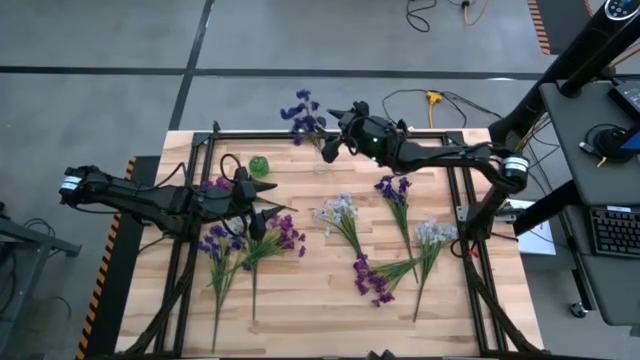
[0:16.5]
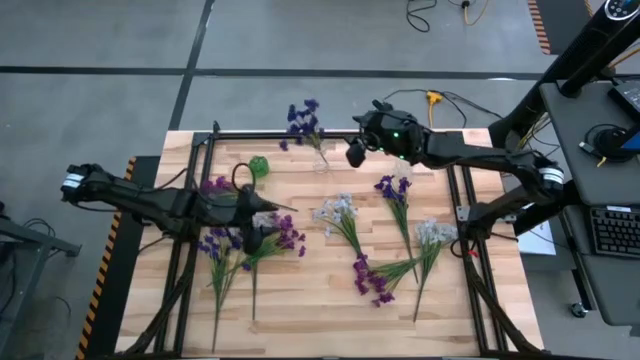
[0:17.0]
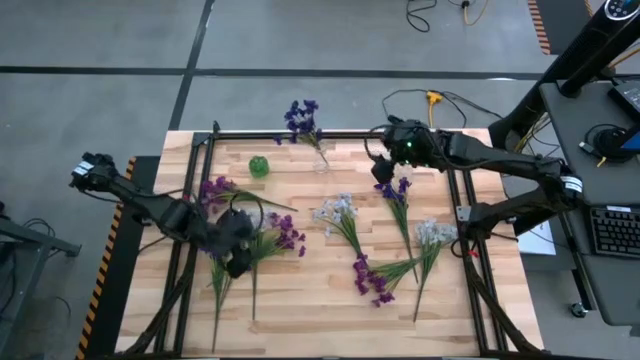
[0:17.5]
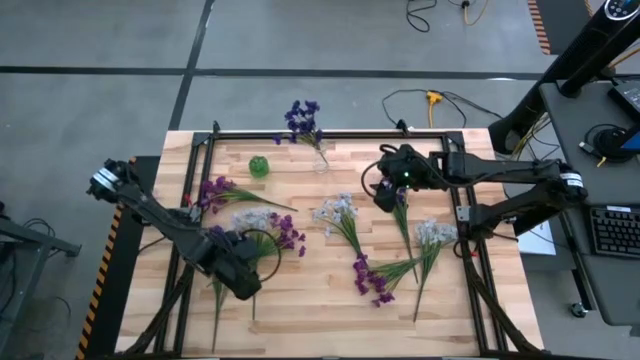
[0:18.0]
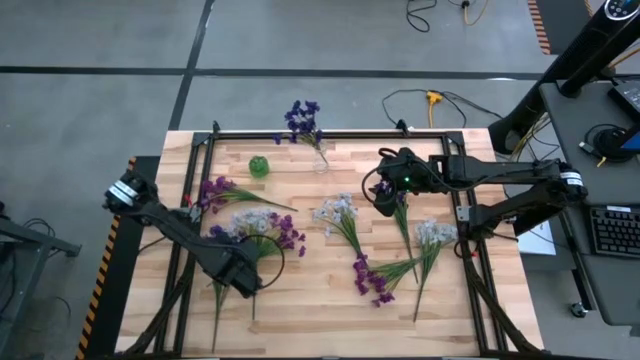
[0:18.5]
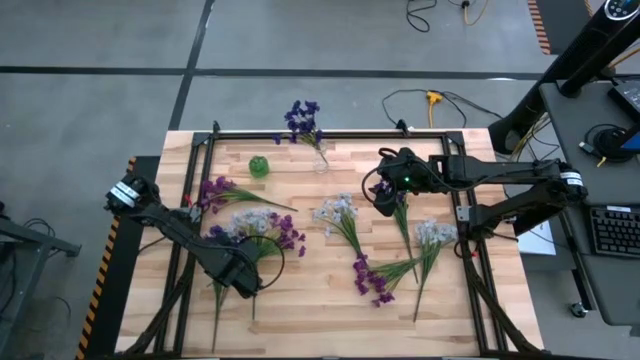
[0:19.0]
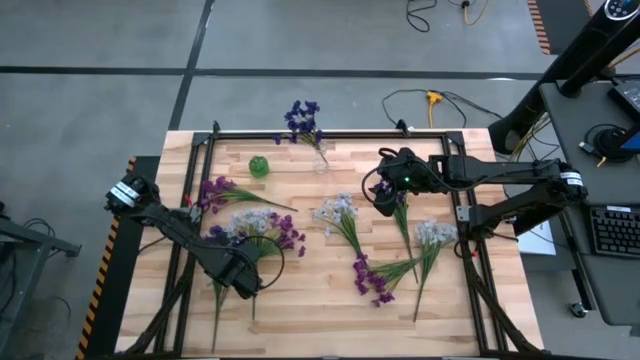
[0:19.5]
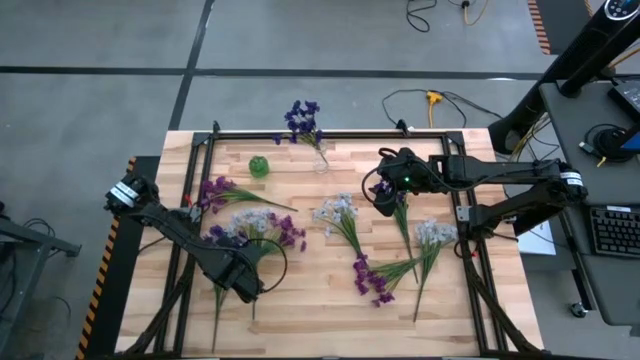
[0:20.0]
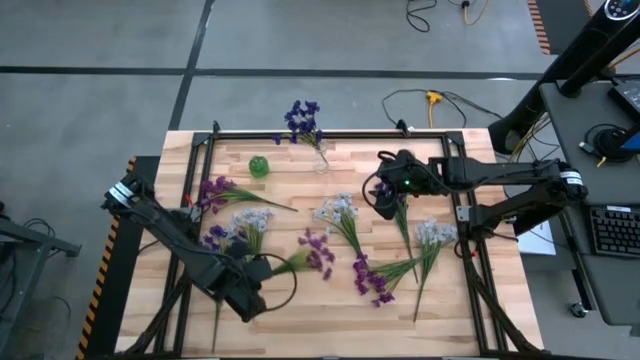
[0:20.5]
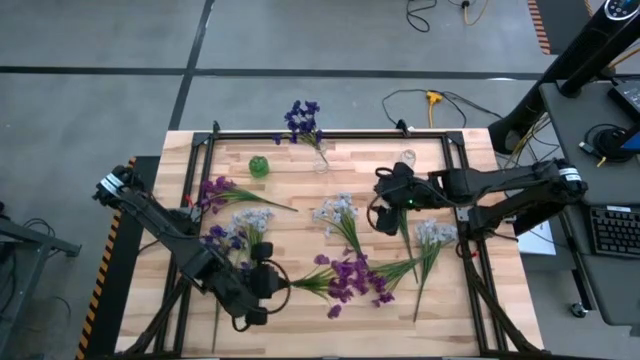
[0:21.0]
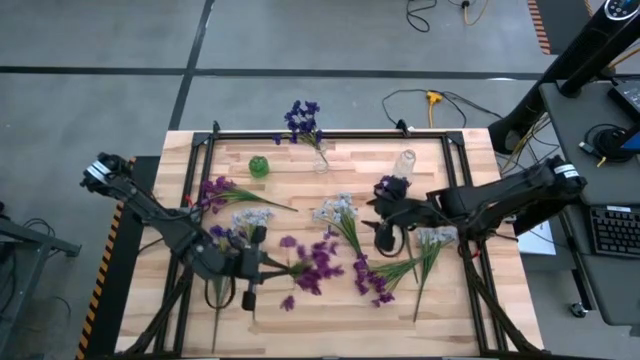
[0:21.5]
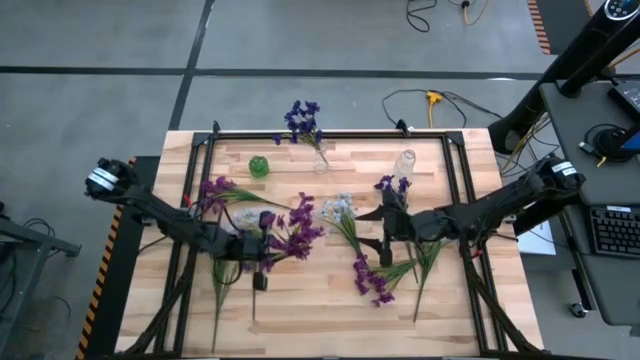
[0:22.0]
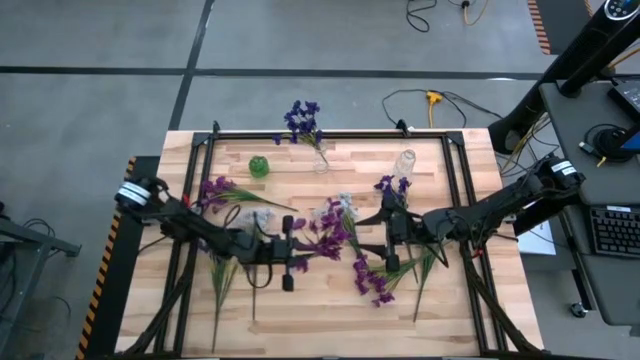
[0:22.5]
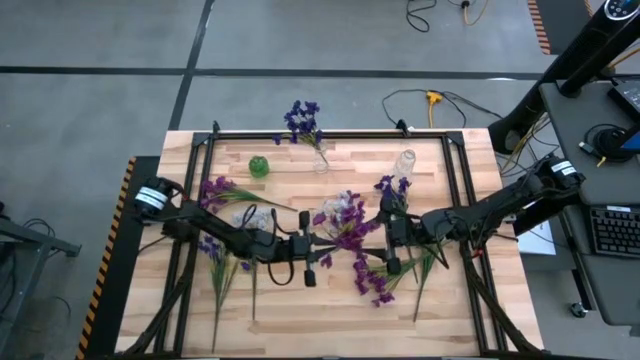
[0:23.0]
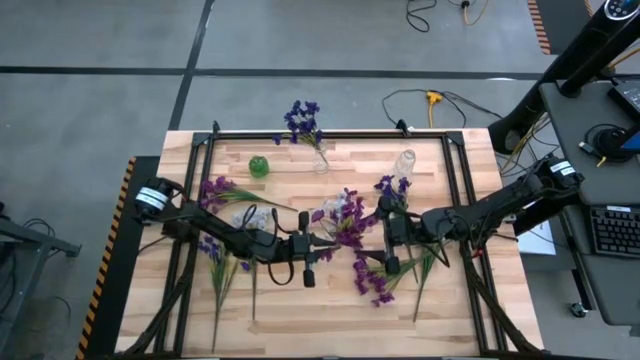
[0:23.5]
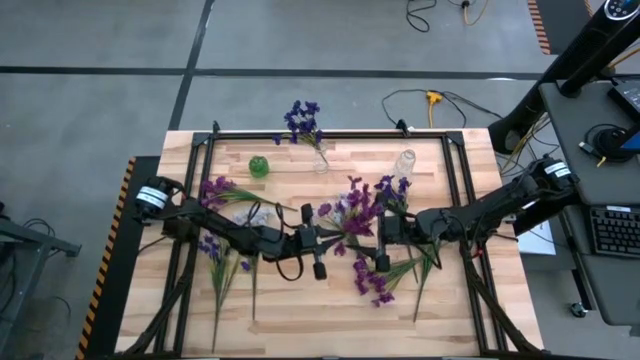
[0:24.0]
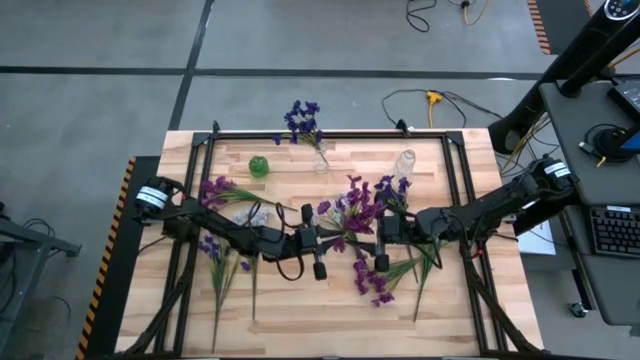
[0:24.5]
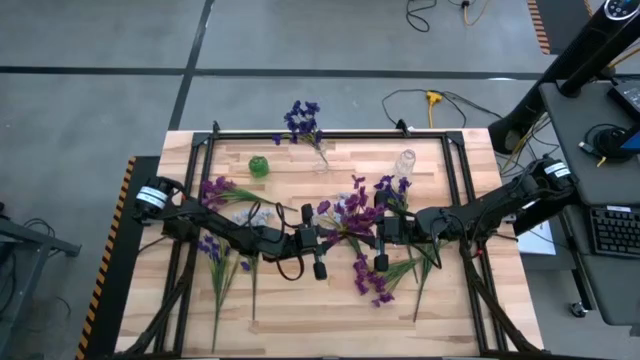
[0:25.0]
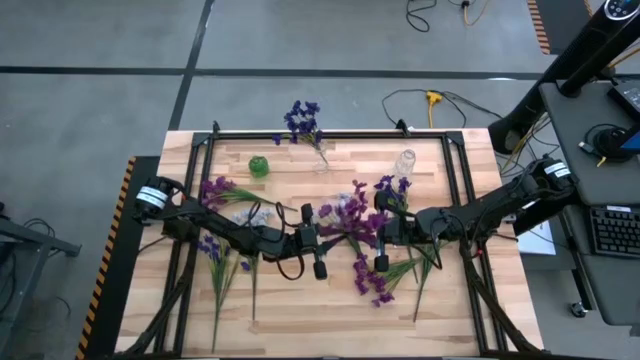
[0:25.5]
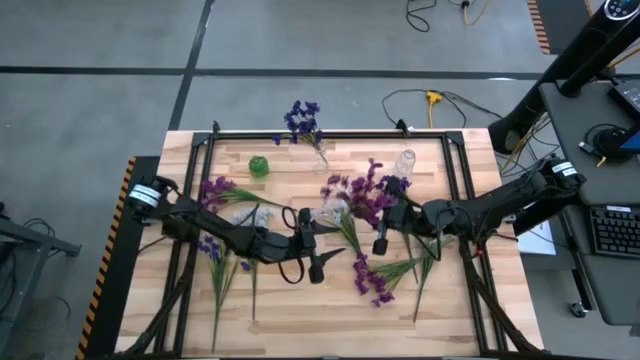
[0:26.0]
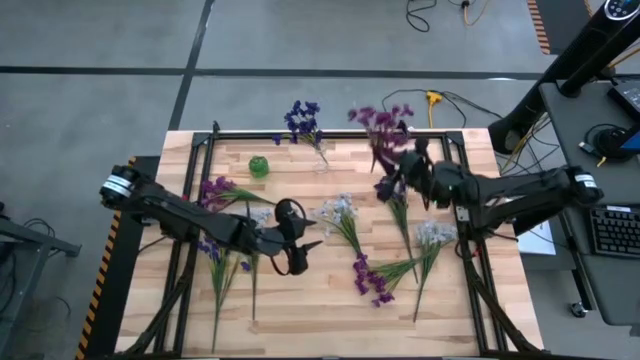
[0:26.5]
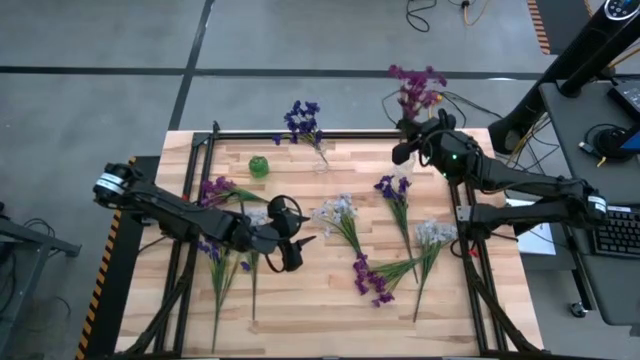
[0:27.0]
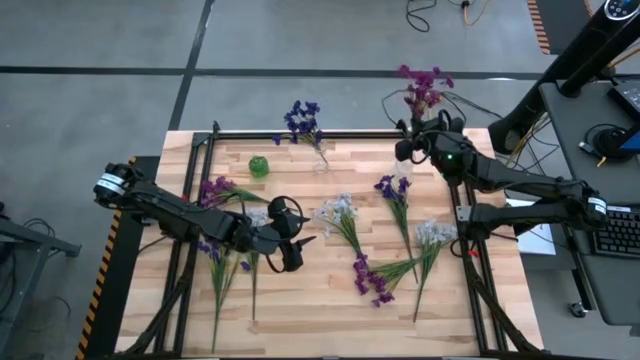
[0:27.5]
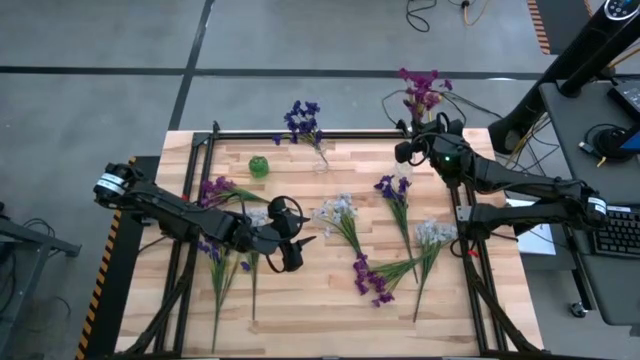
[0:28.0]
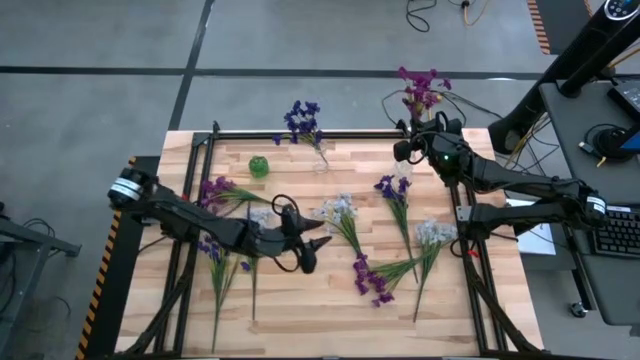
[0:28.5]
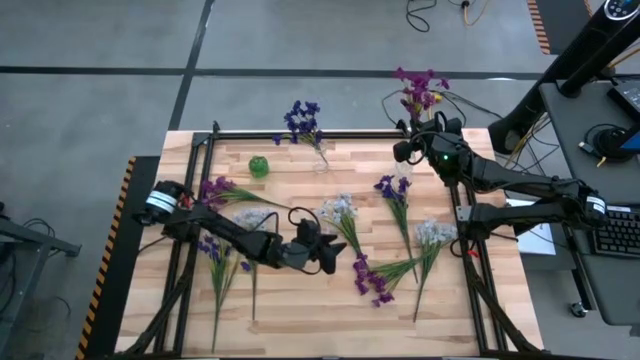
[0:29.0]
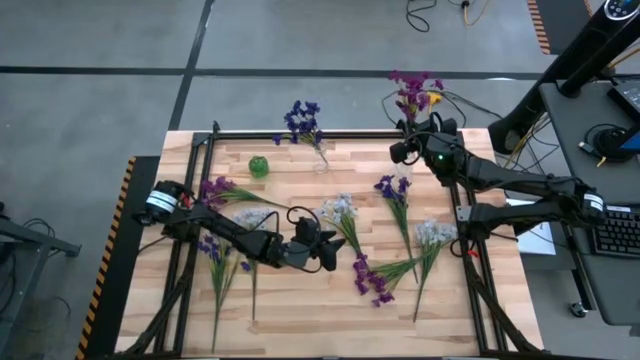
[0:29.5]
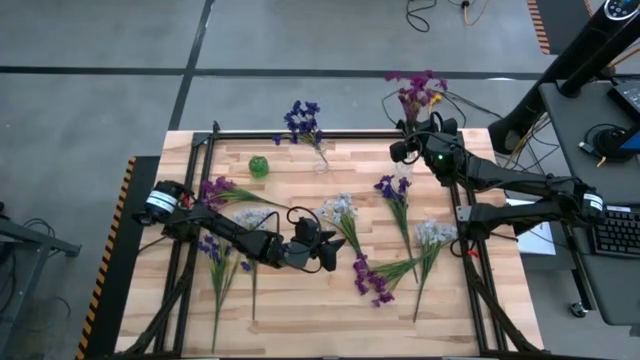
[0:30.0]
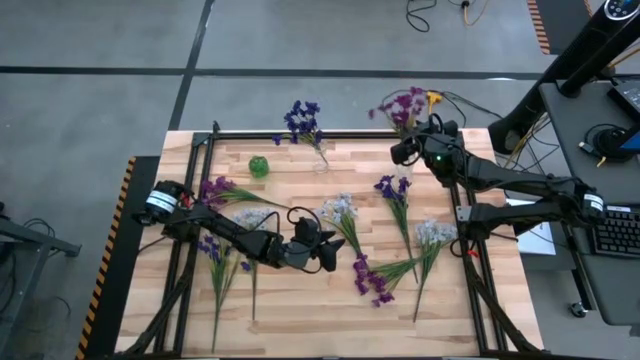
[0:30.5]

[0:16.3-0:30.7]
Task: Sort flowers into vase by color
Put the bottom left light violet flowers into the right transparent vase

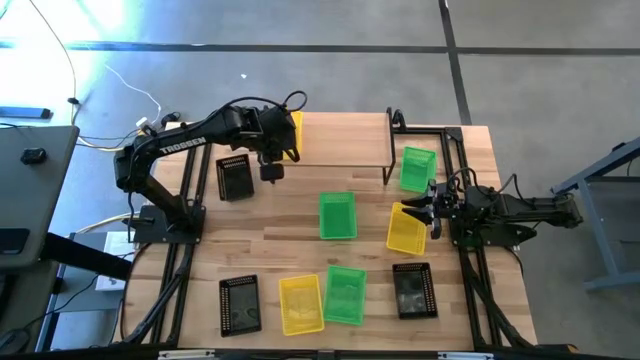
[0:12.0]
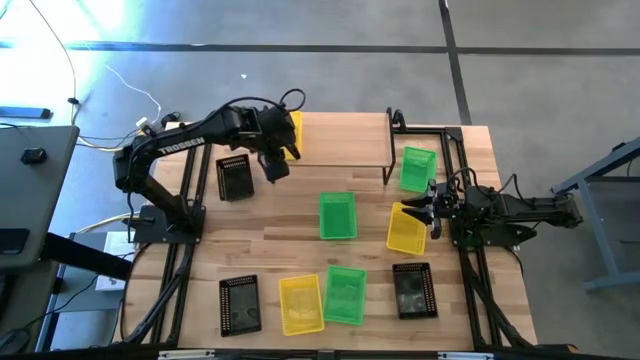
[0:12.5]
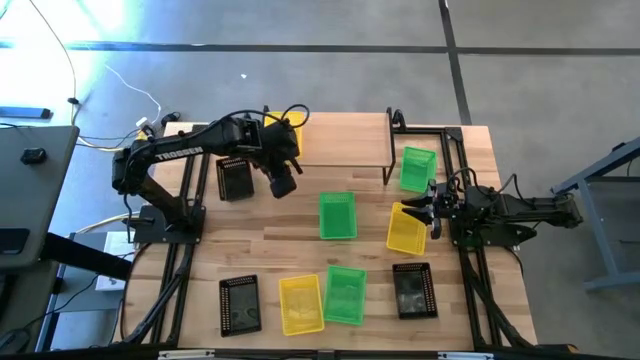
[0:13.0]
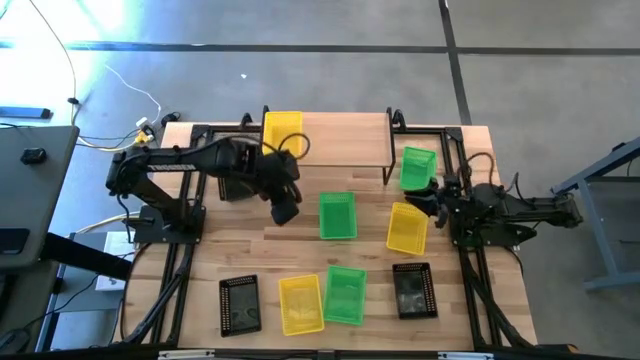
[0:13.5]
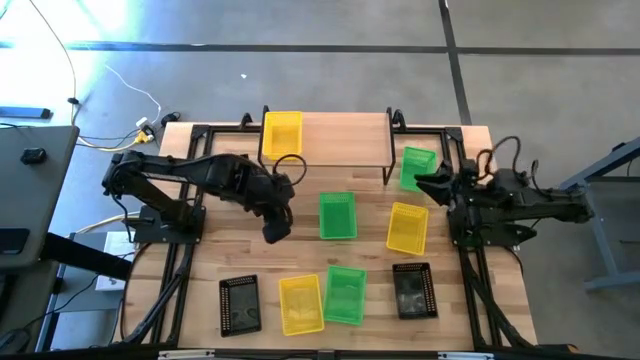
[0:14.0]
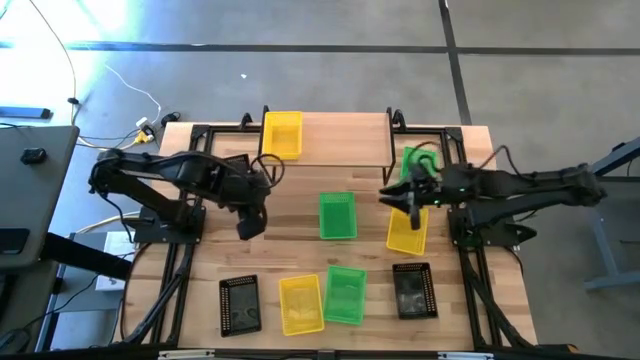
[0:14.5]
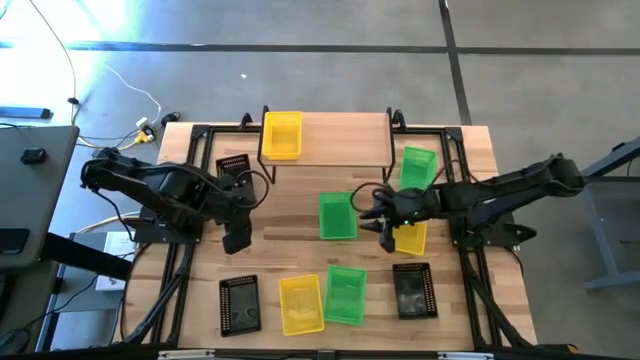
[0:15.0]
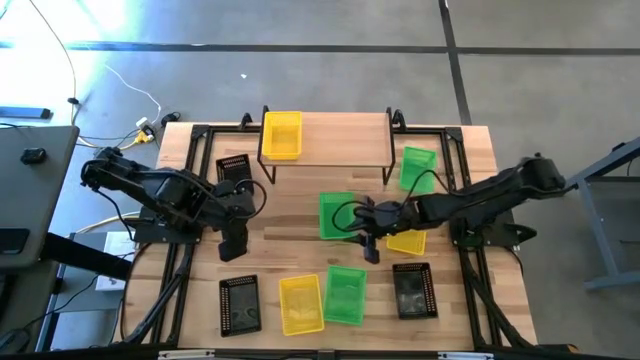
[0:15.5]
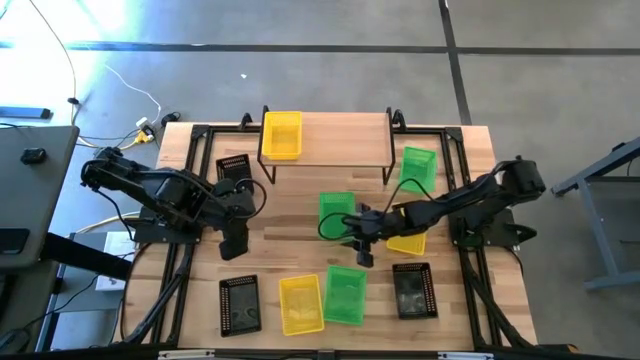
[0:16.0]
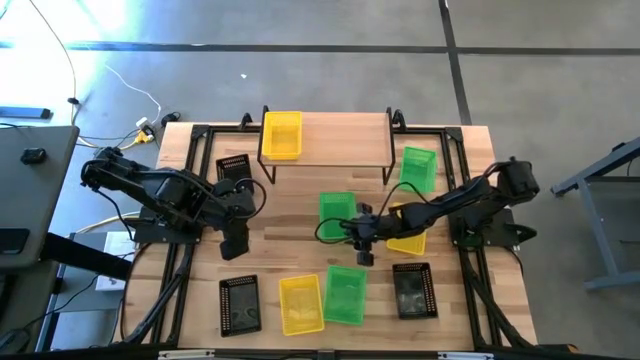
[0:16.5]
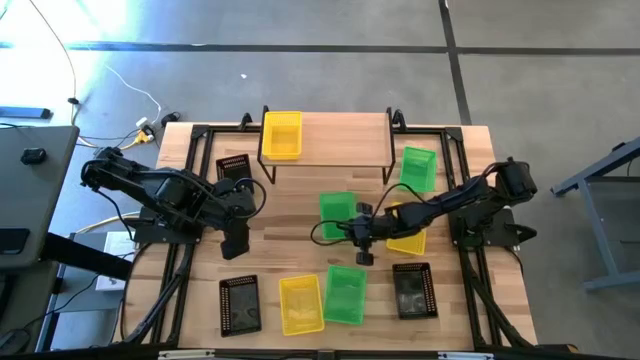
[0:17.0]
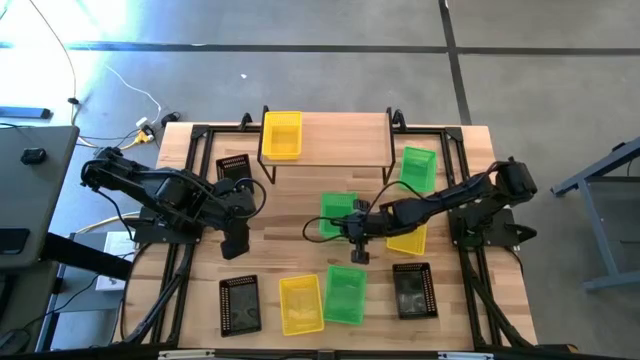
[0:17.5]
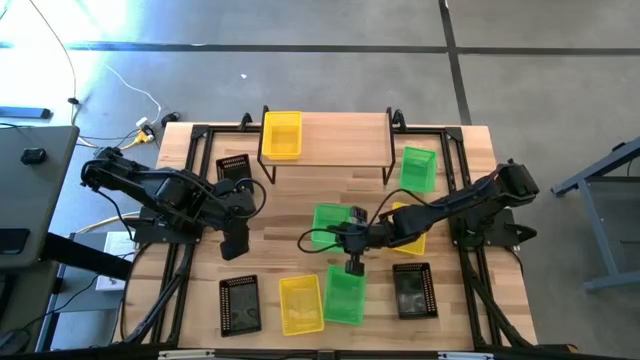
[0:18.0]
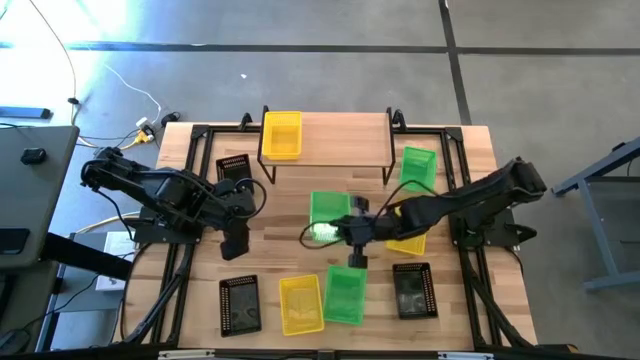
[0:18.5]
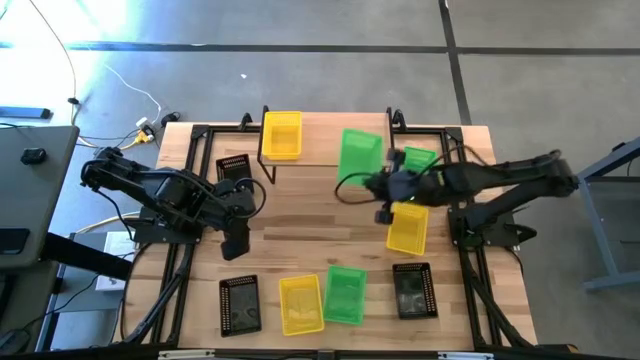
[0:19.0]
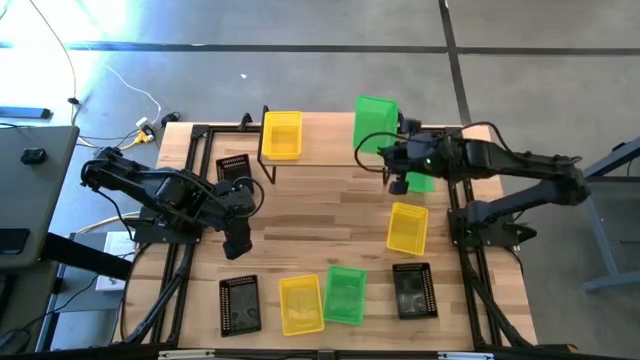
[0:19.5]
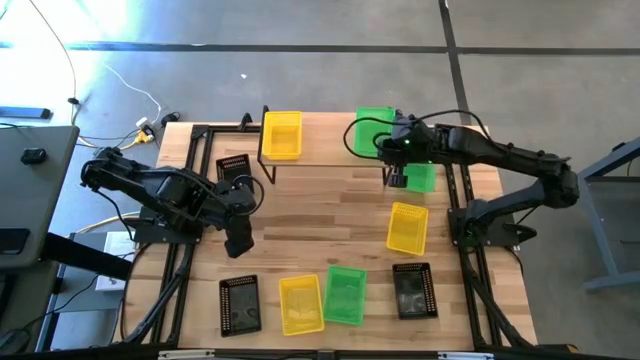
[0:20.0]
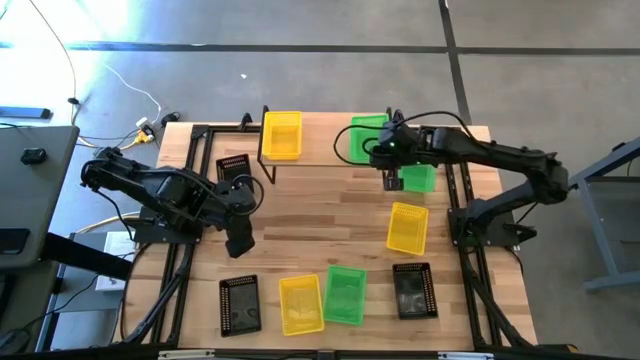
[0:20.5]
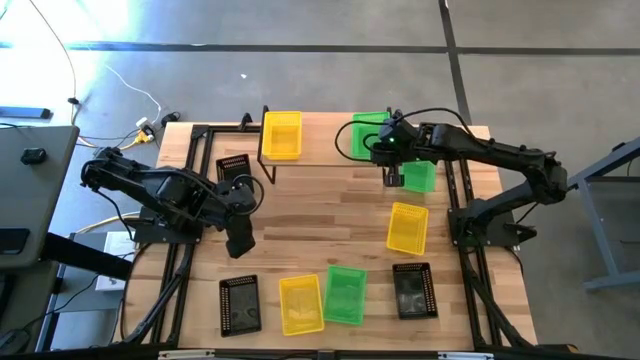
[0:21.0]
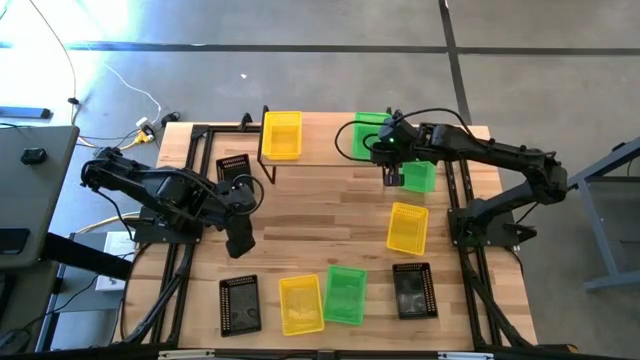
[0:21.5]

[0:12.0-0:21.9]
Task: Stack baskets on shelf by color
Put the middle left green bin on the shelf
